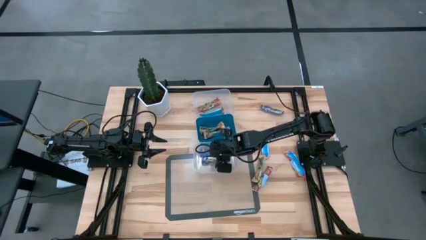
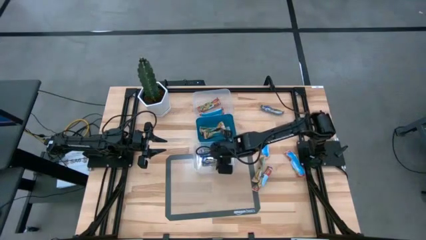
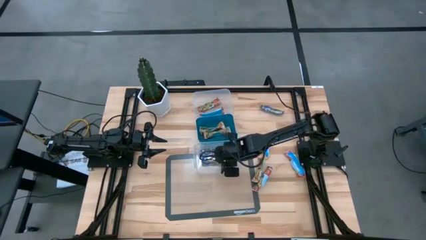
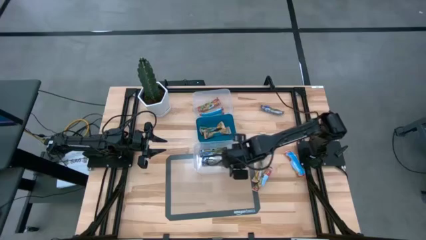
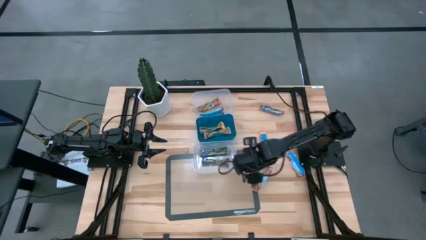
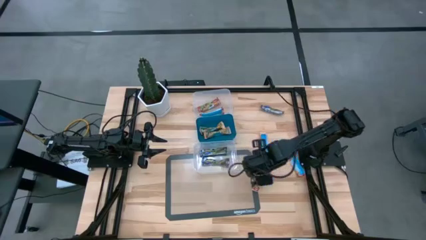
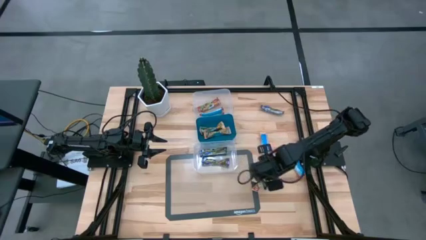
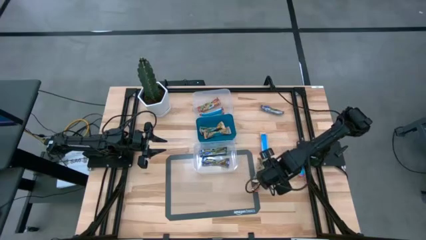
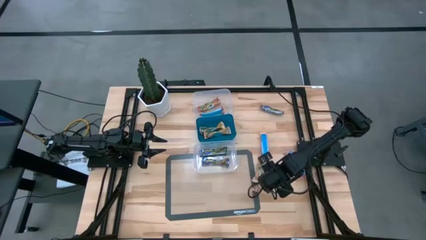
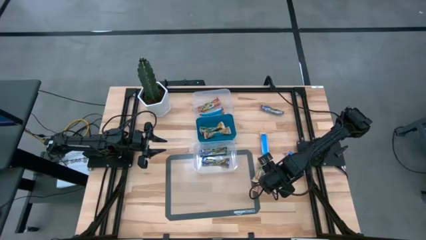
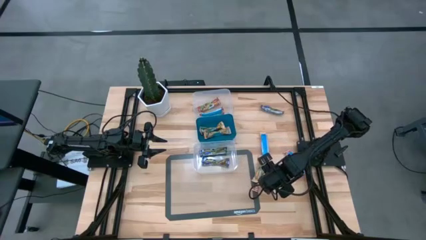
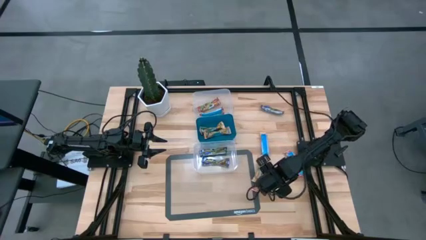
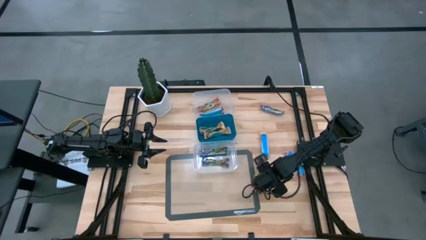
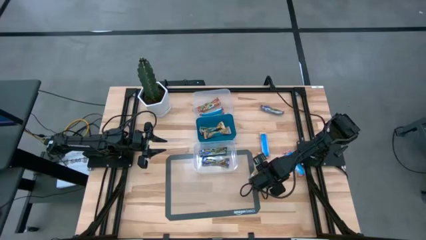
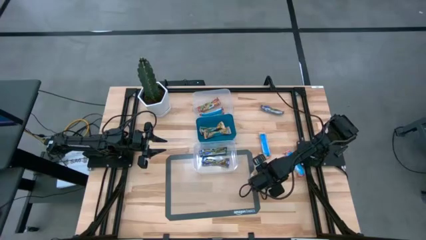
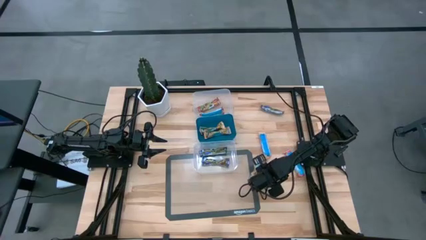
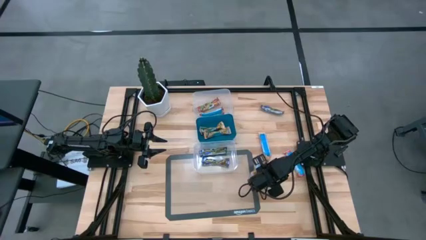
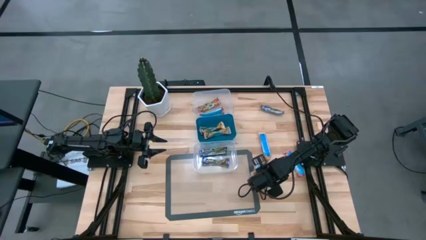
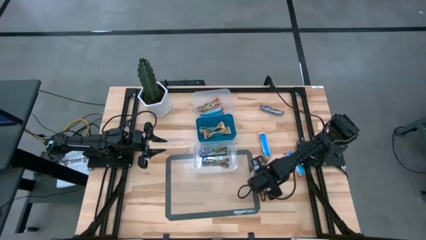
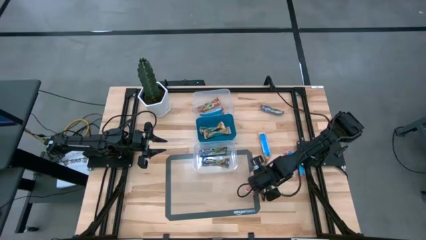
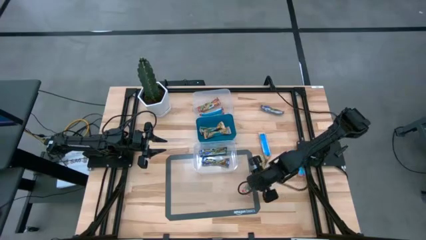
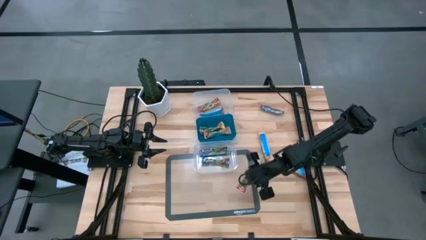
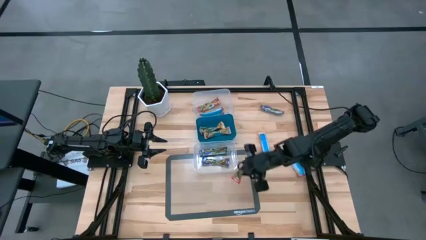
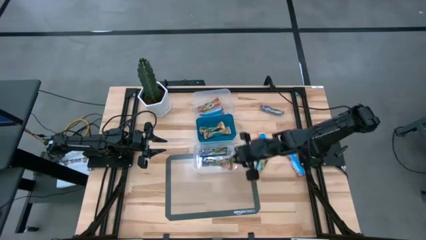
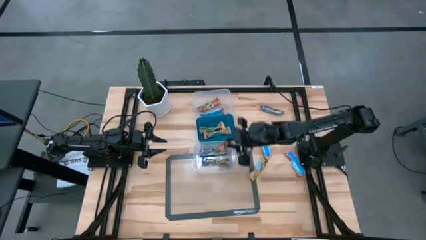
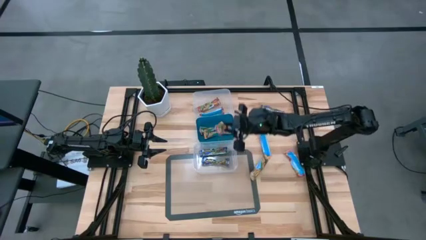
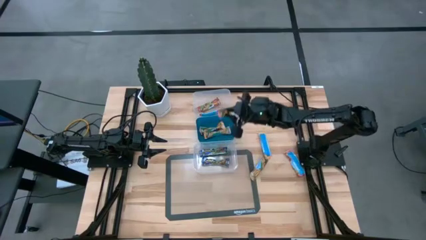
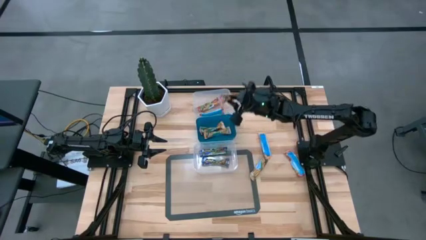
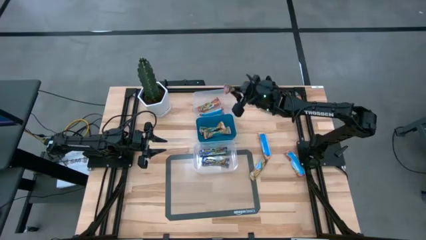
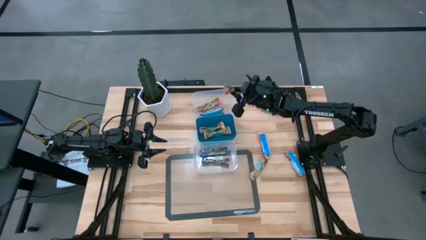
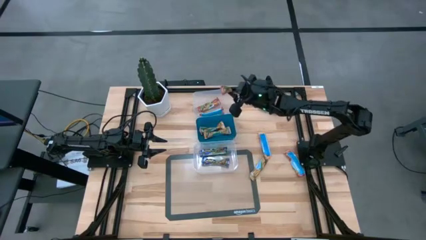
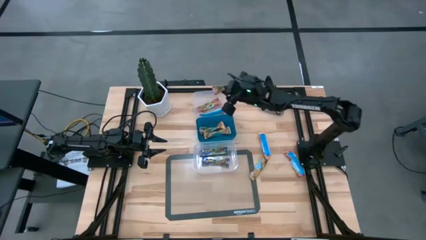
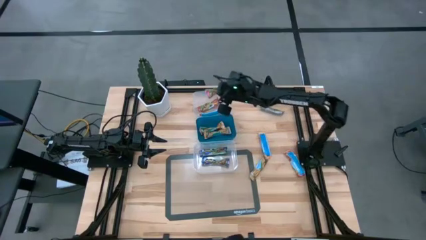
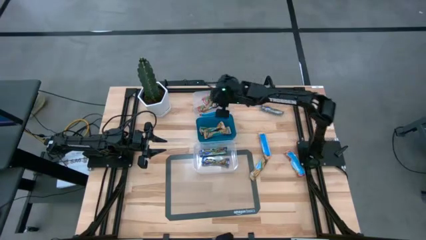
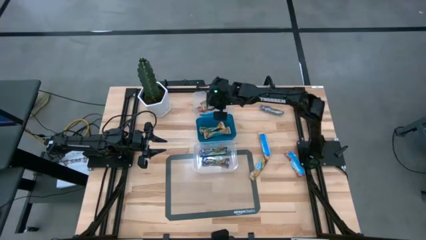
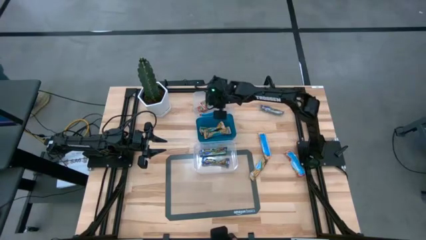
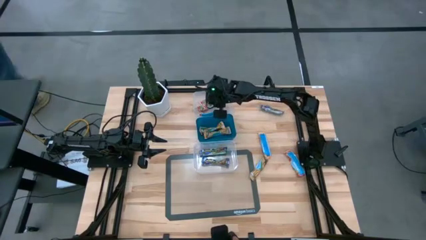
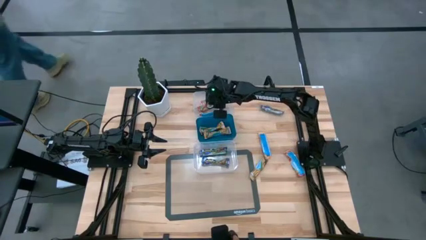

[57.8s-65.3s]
Task: Pick and place Granola Bars by type
Put the red granola bar into the top transparent bin

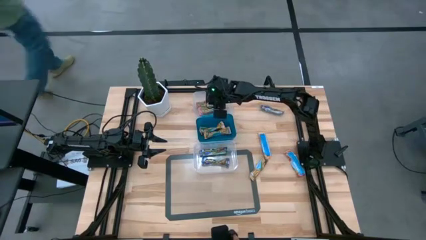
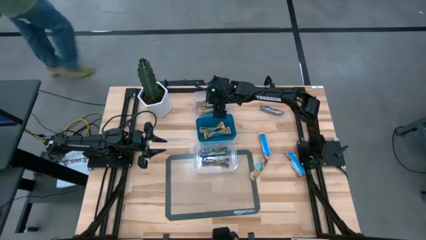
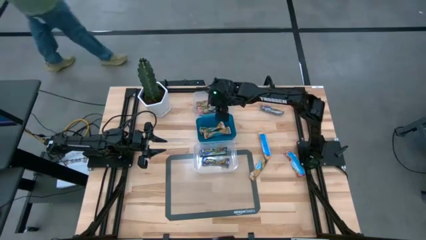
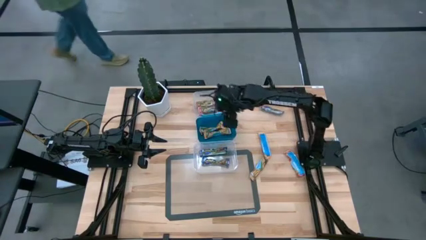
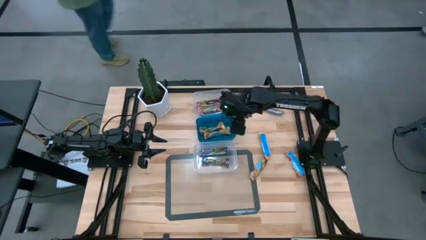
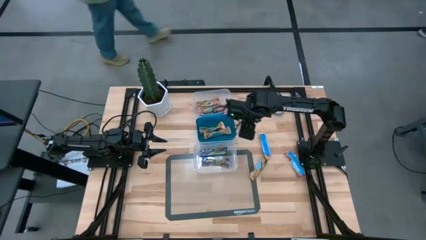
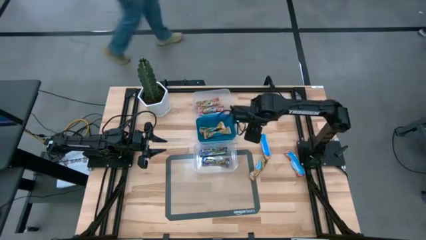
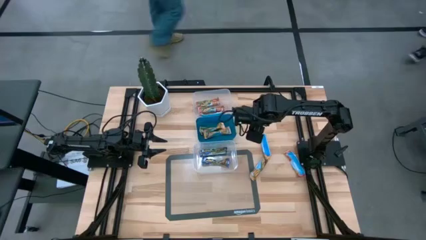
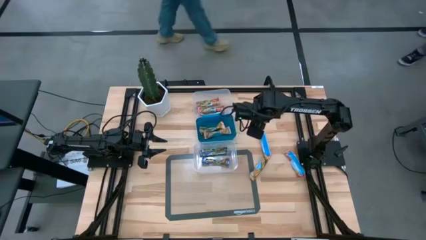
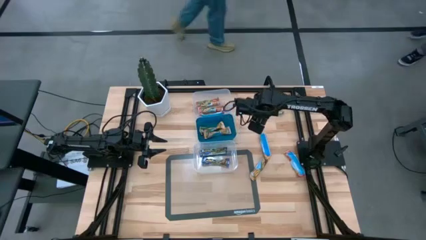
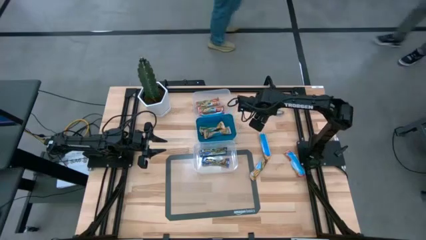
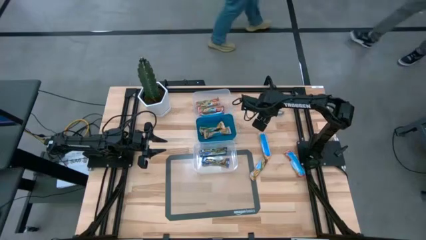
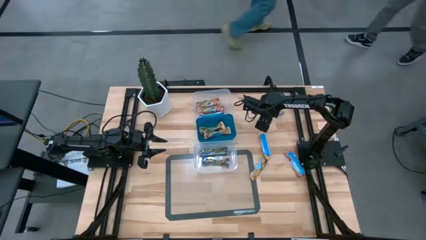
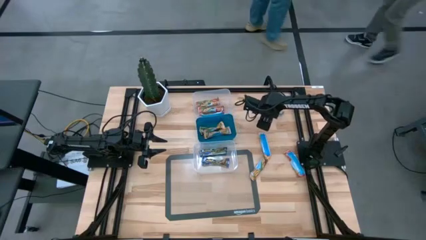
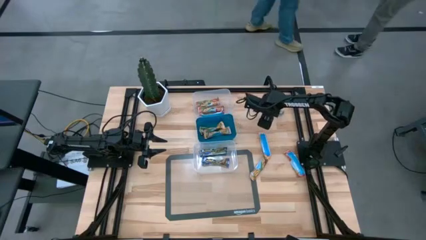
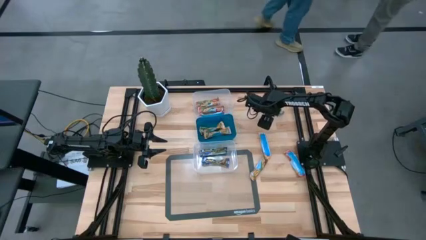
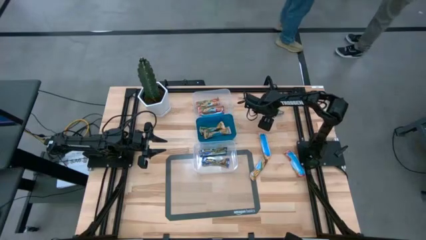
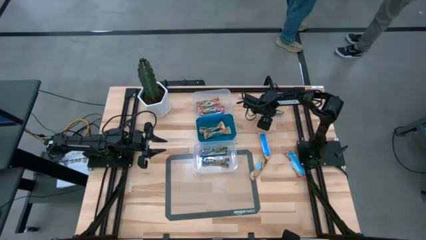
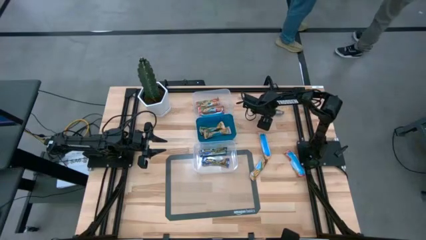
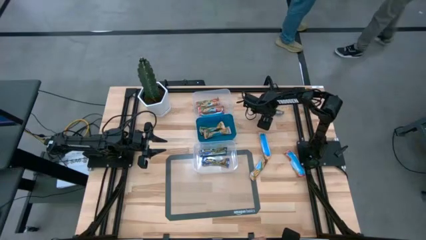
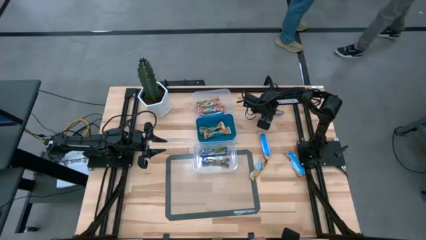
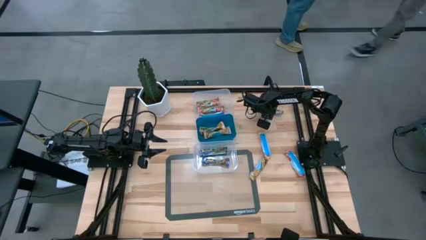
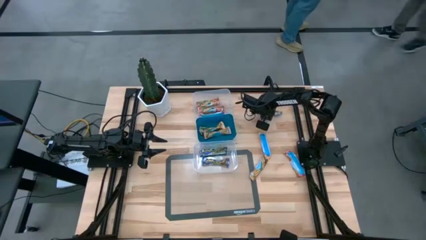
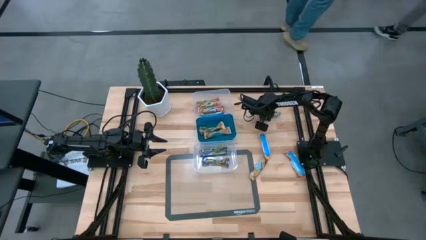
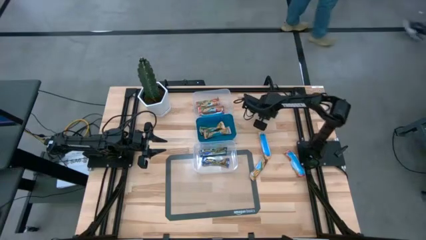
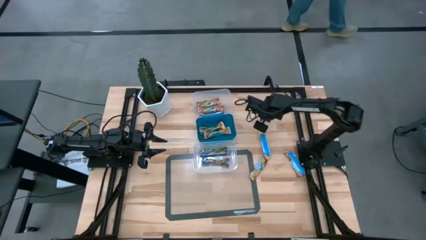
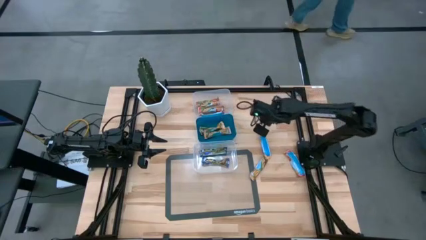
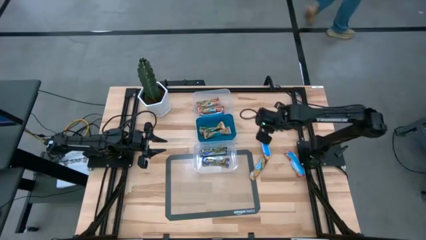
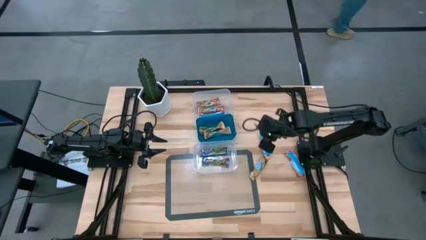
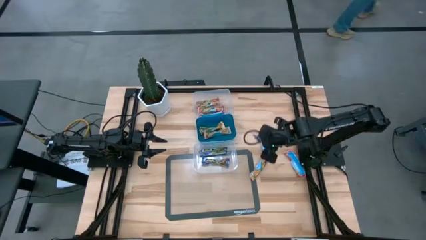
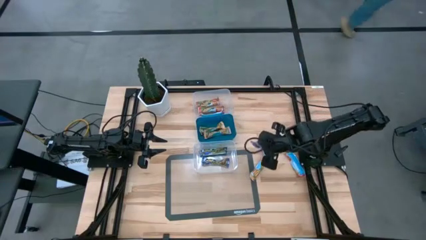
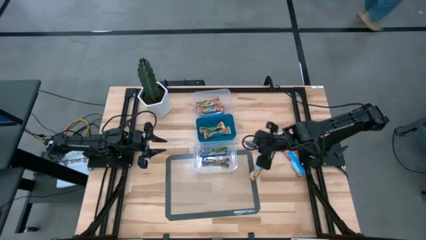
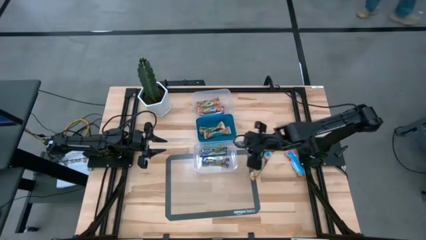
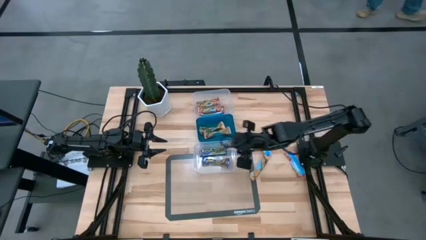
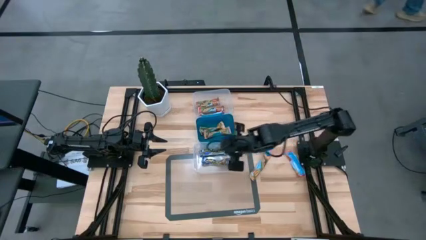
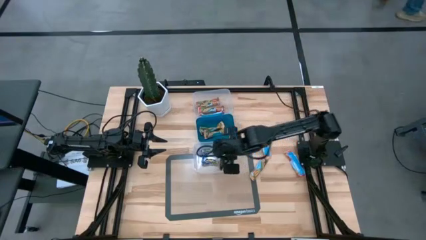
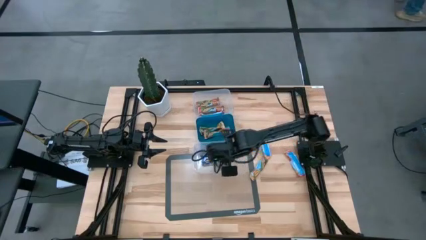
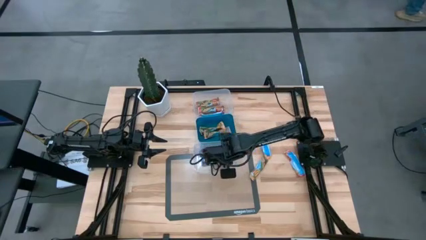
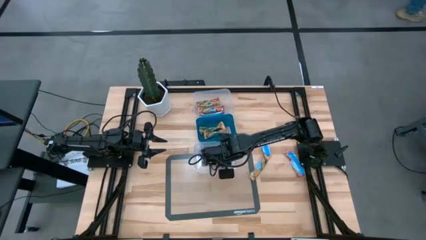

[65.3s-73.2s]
Put the blue granola bar into the bottom transparent bin

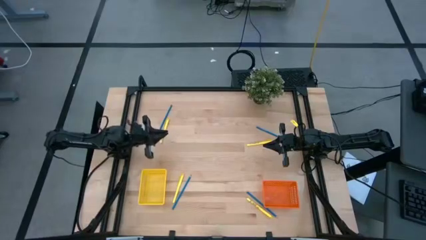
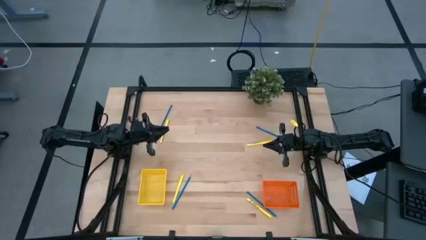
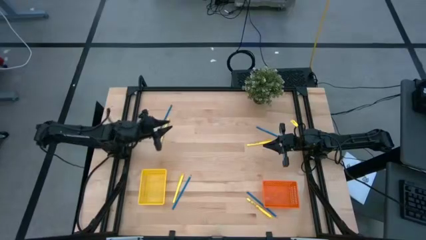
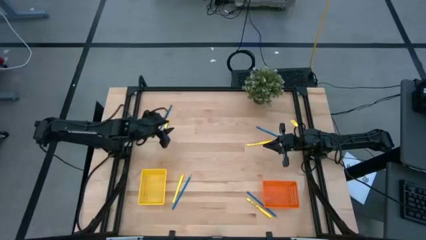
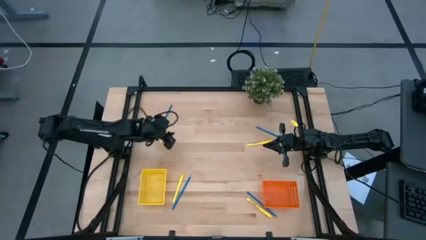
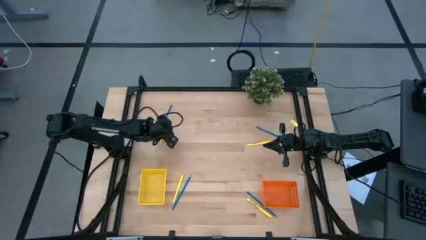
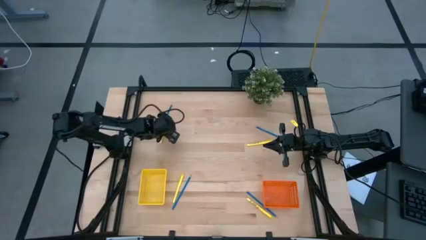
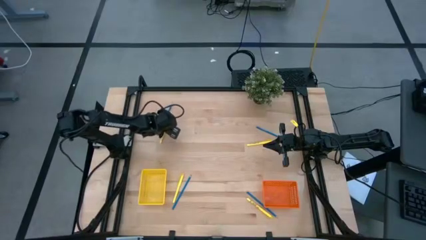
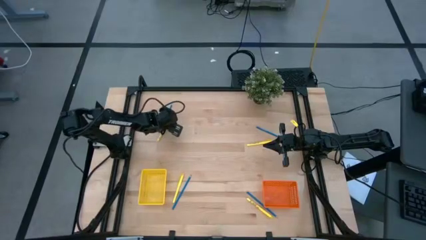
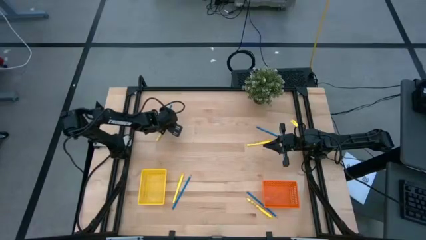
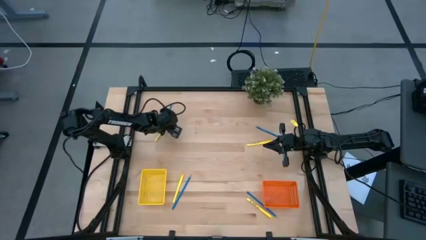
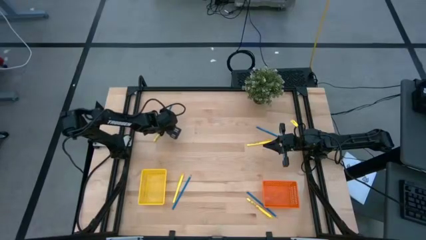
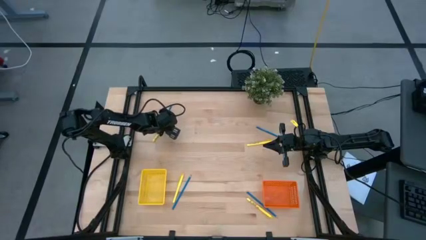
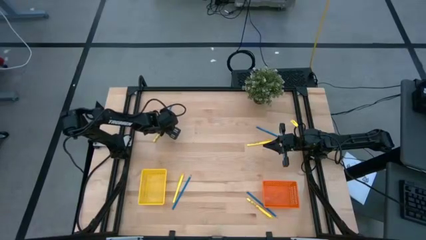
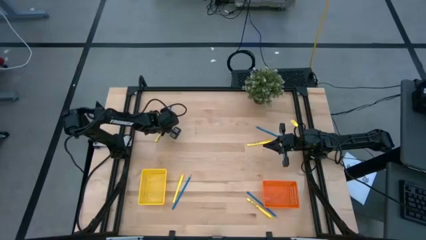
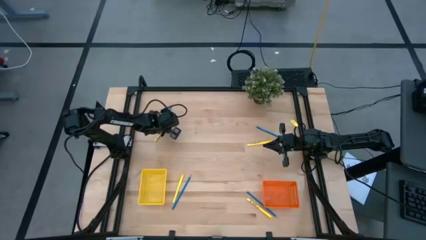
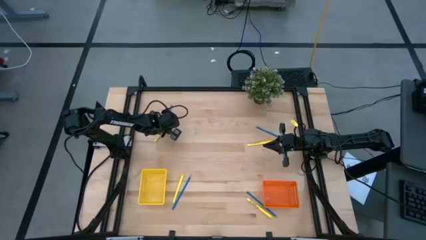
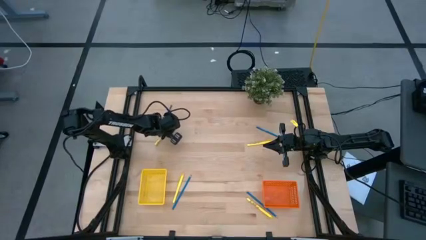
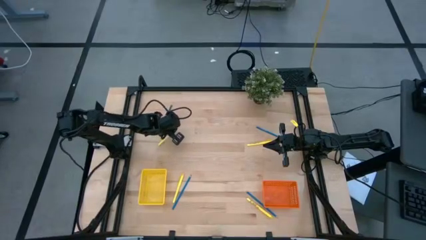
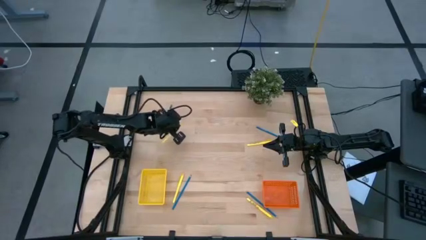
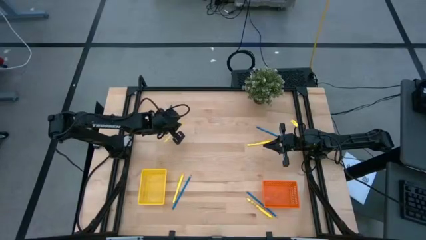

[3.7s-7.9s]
Task: Sort pens & pencils
Put the top left yellow pen into the yellow bin
